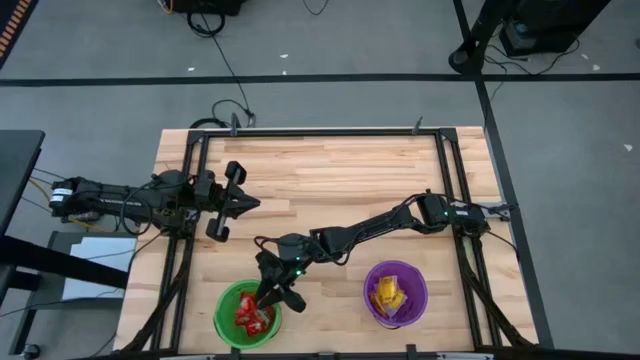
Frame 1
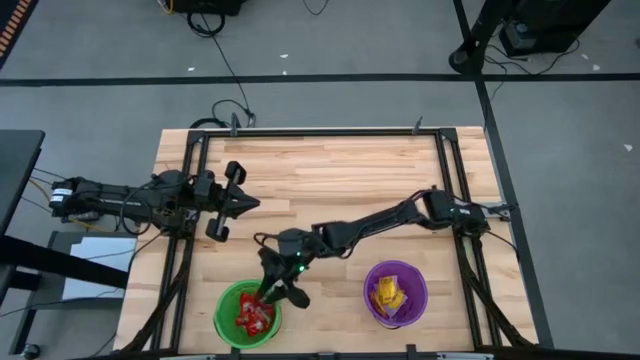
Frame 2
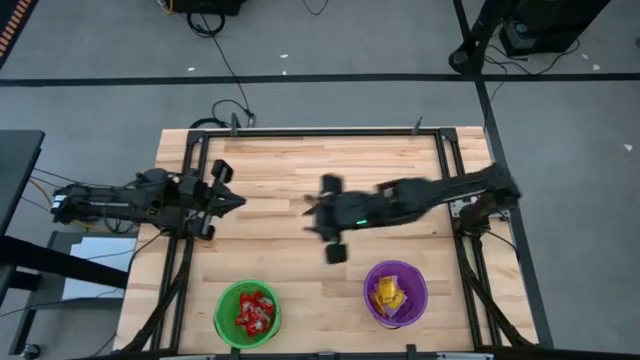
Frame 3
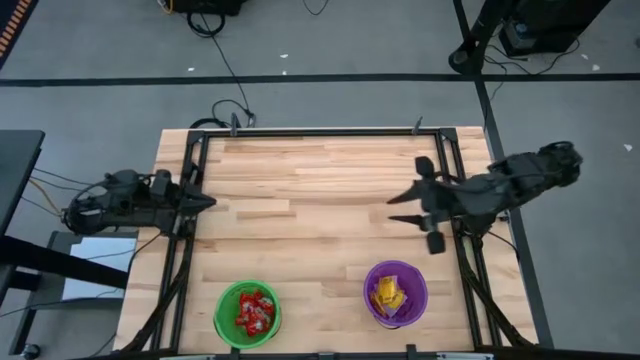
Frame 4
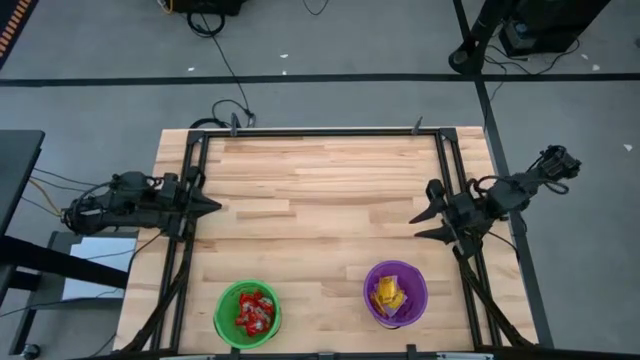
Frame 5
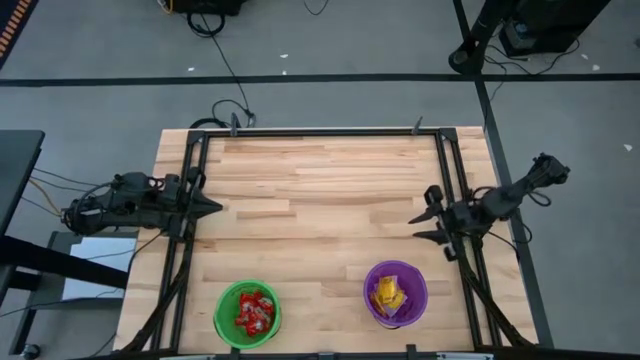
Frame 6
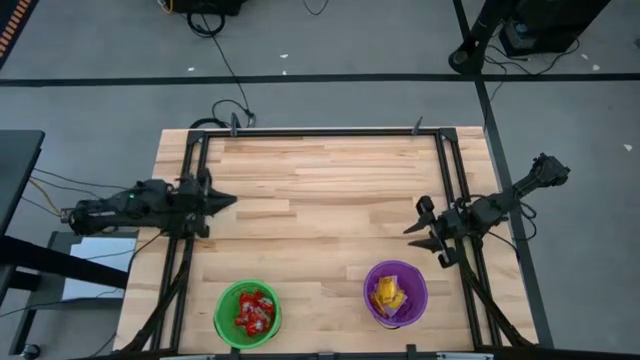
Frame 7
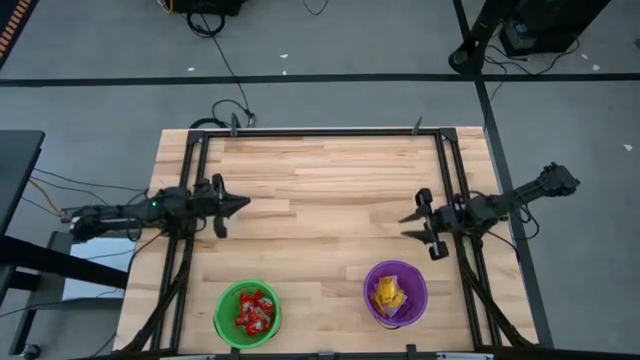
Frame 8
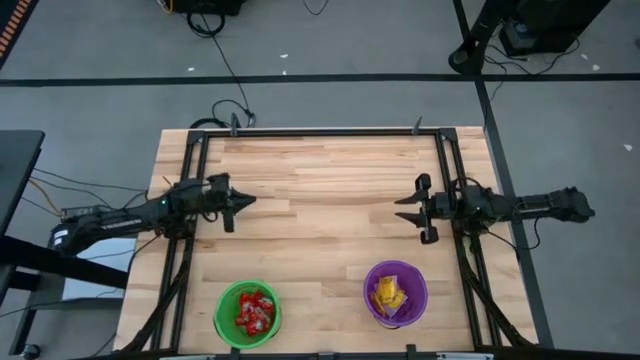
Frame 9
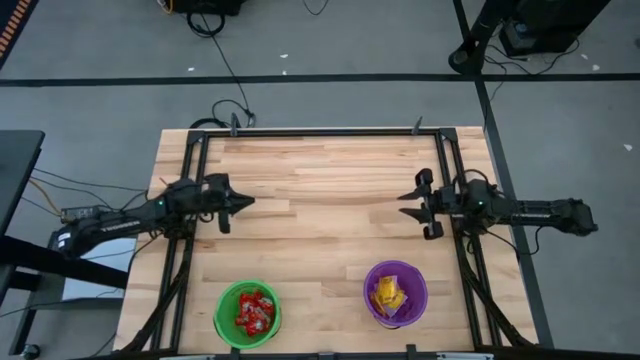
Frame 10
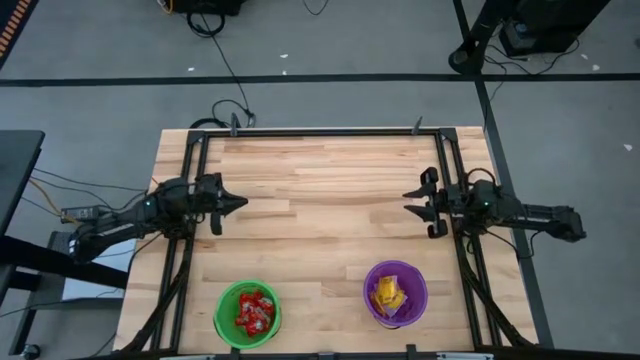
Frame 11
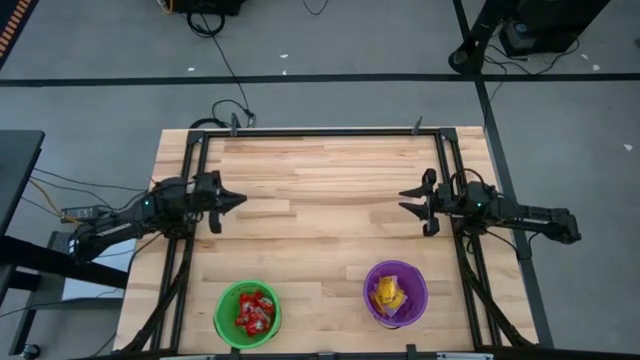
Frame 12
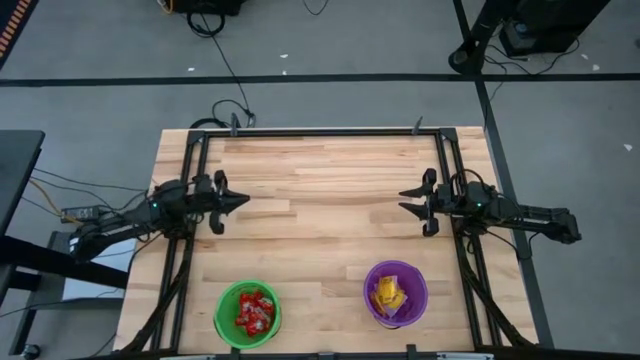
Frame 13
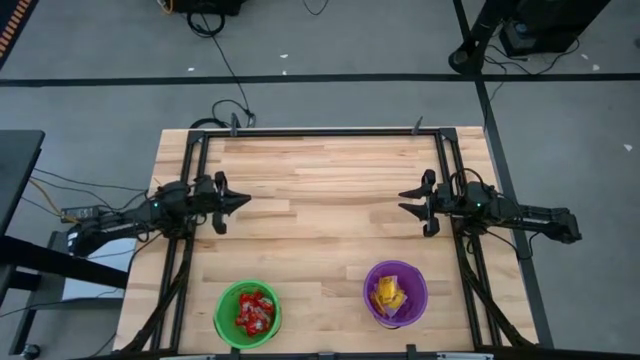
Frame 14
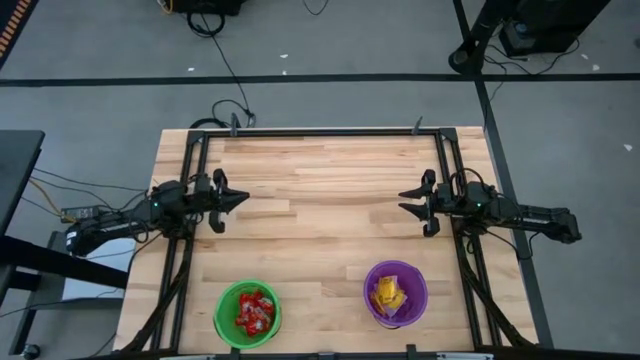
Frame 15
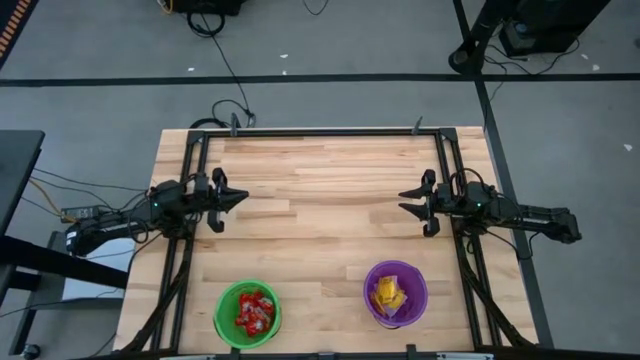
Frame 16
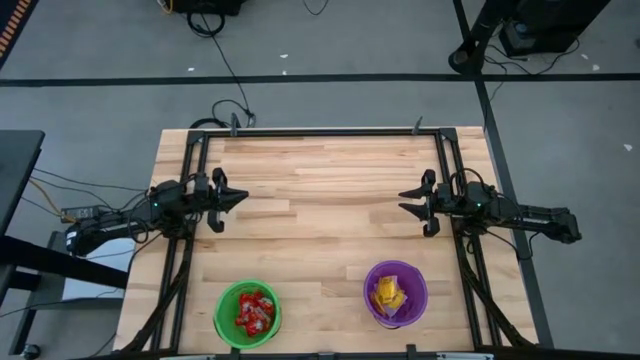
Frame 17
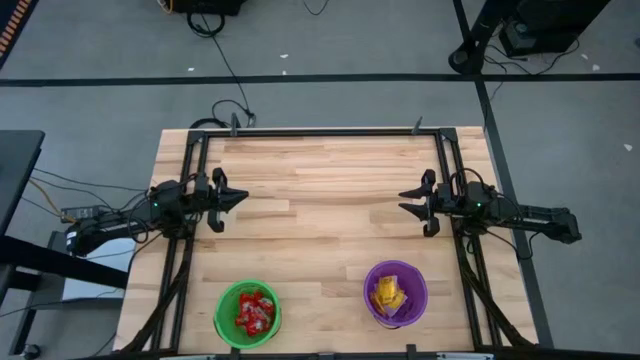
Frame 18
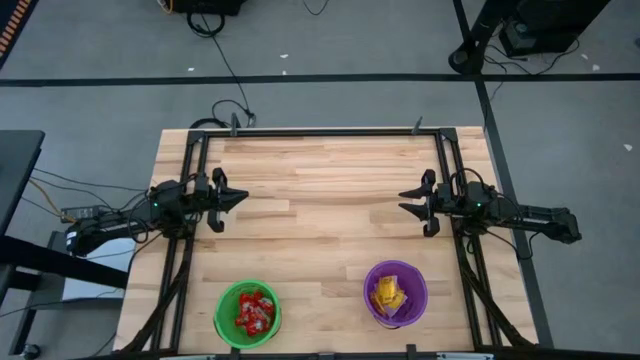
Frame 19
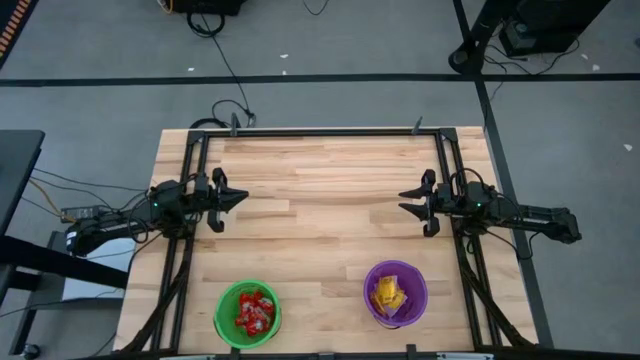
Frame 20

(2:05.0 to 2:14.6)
Task: Sort candy by brand, put in halloween buckets
Return to Home Position

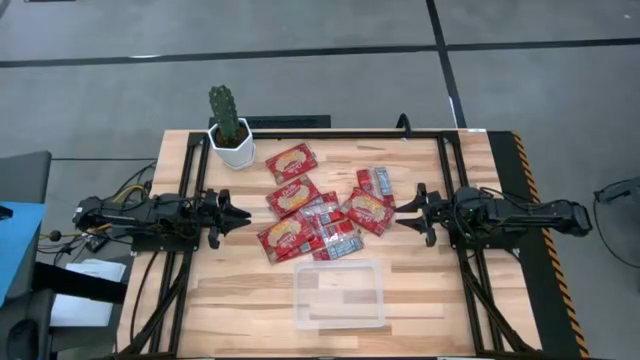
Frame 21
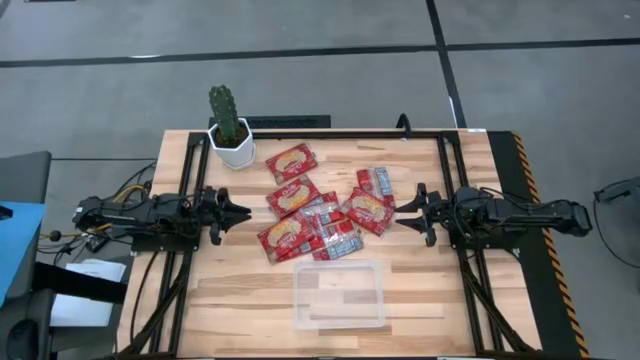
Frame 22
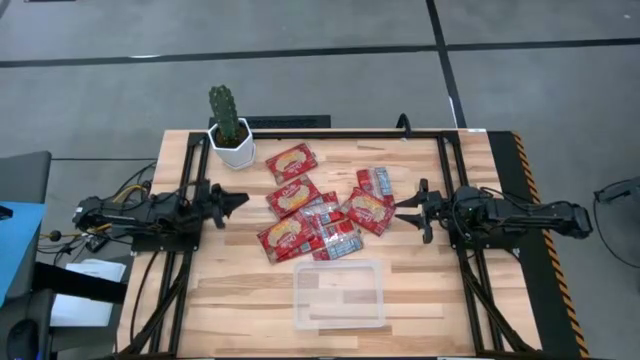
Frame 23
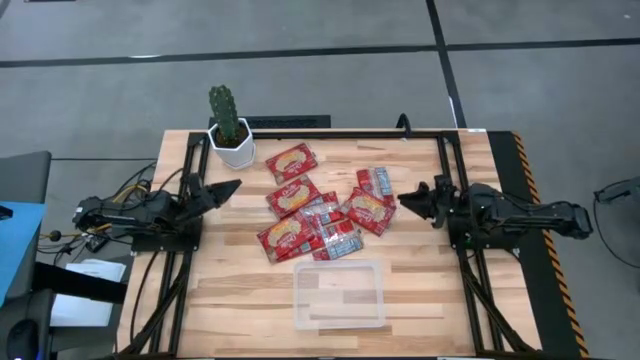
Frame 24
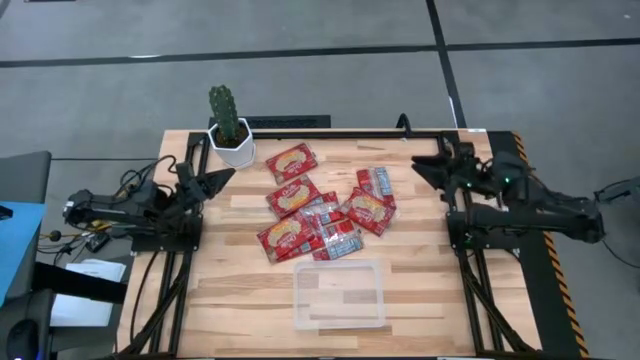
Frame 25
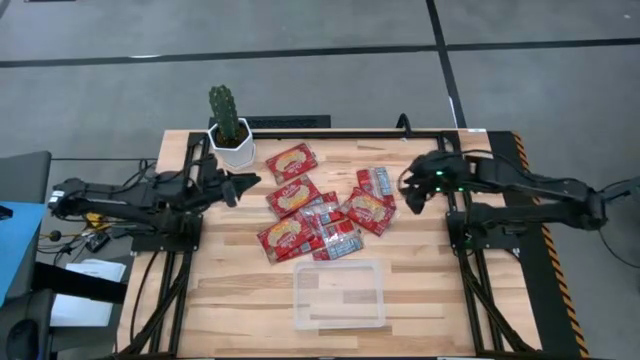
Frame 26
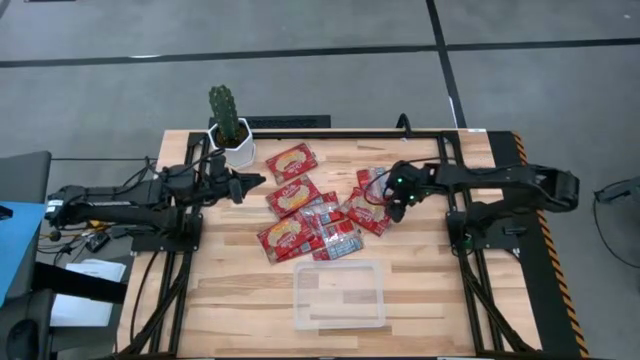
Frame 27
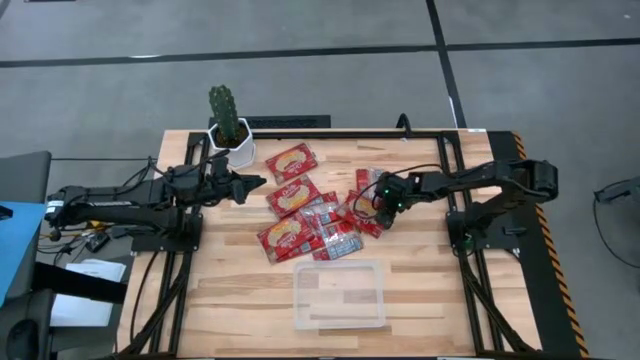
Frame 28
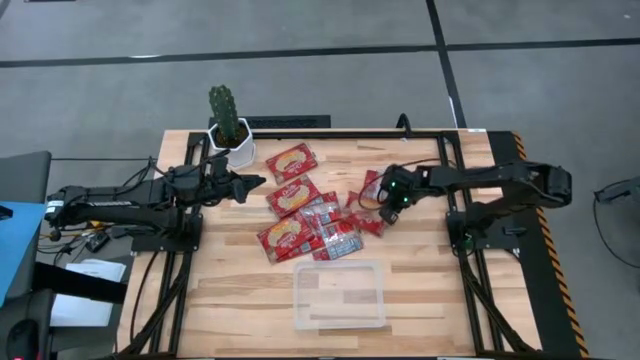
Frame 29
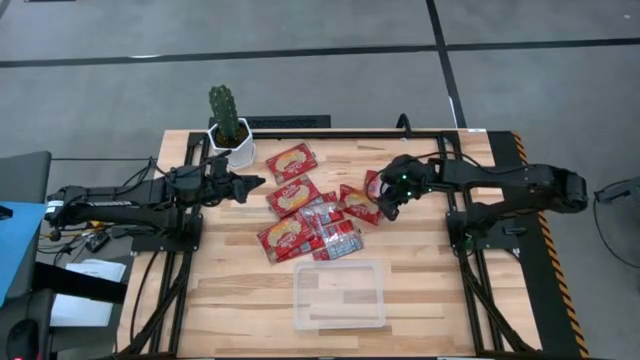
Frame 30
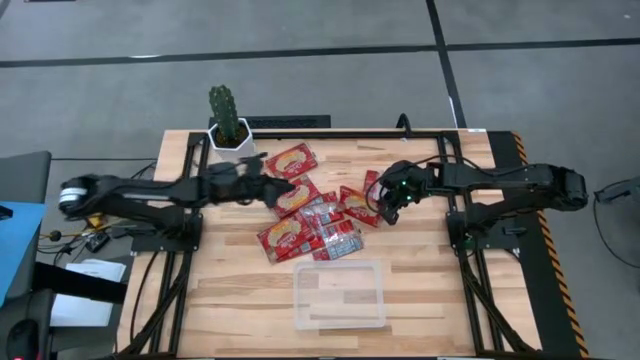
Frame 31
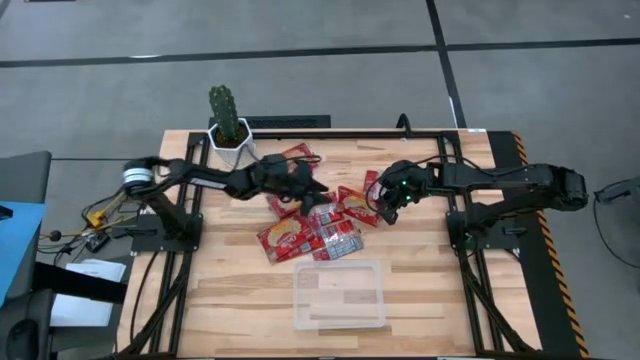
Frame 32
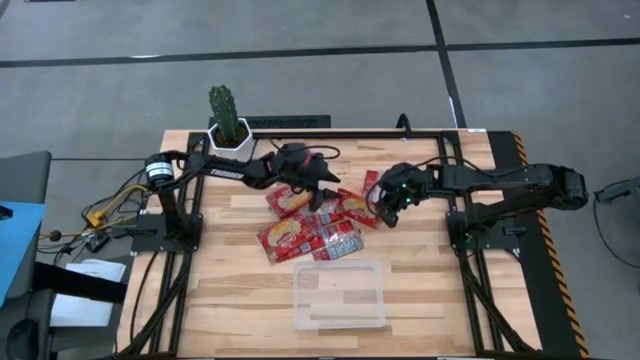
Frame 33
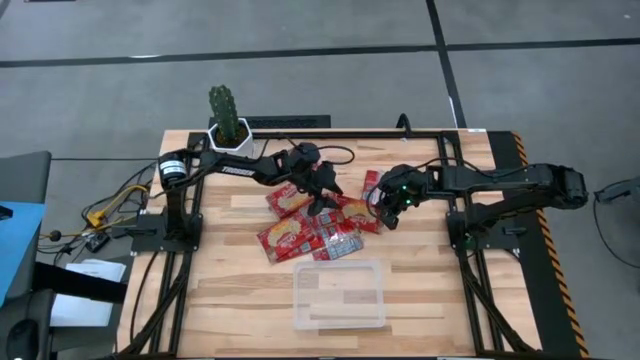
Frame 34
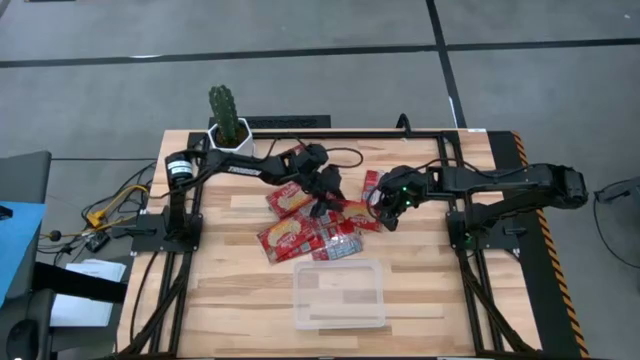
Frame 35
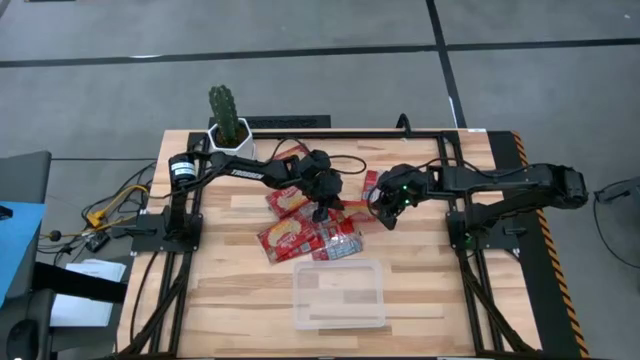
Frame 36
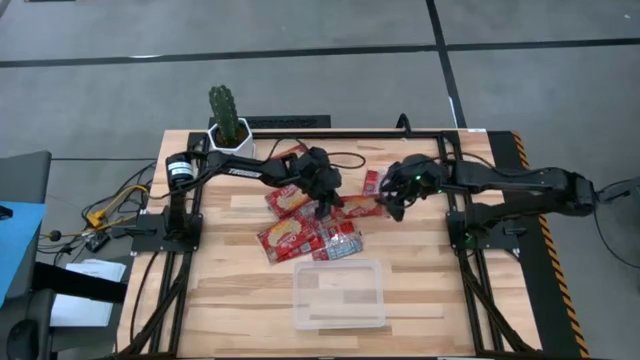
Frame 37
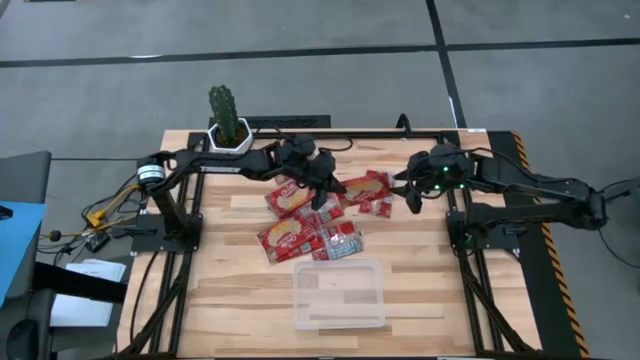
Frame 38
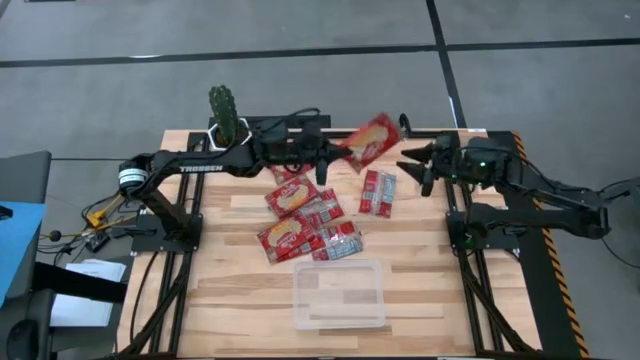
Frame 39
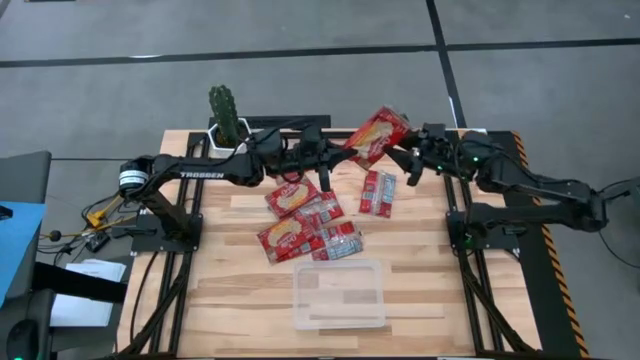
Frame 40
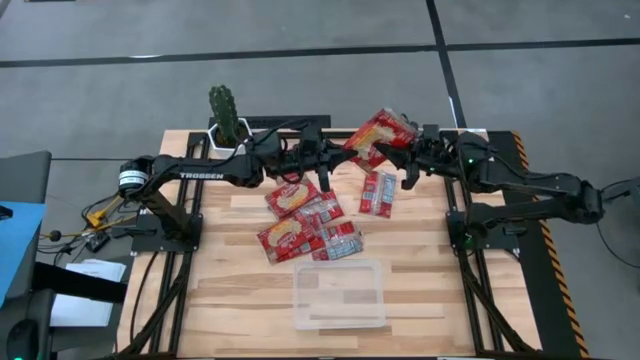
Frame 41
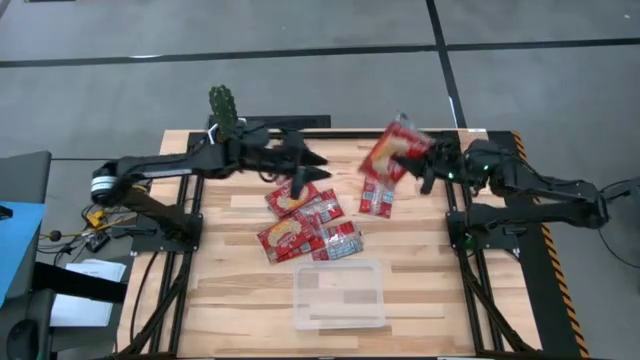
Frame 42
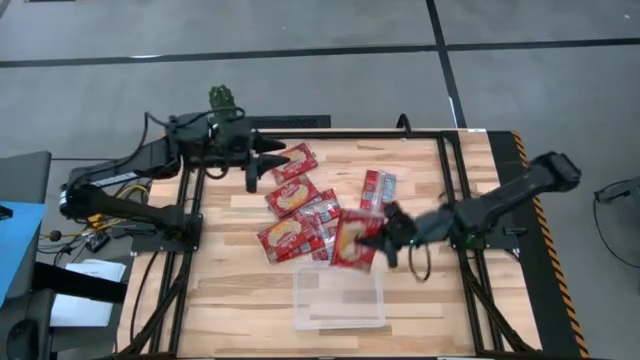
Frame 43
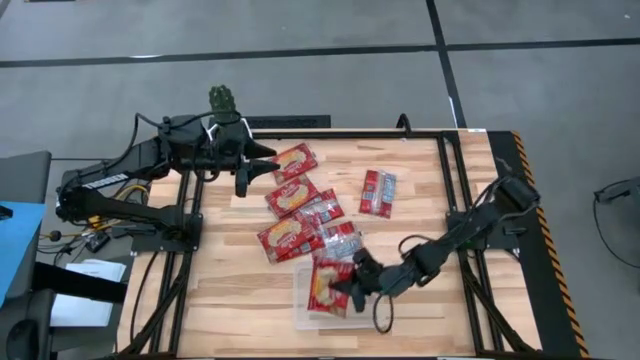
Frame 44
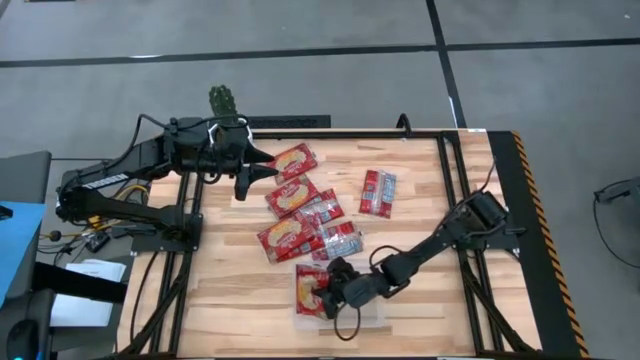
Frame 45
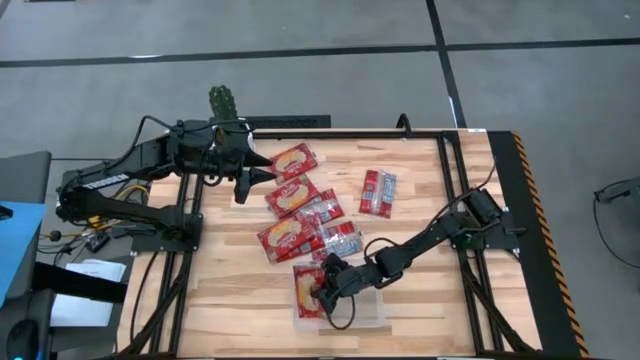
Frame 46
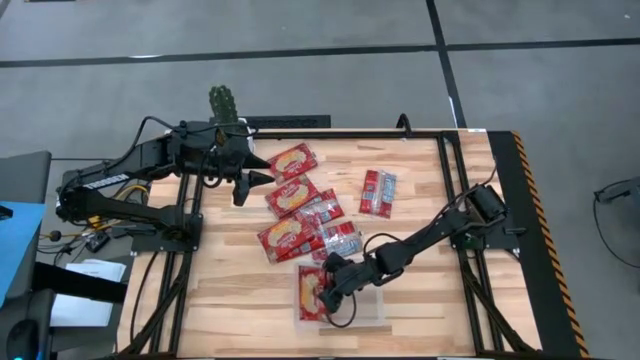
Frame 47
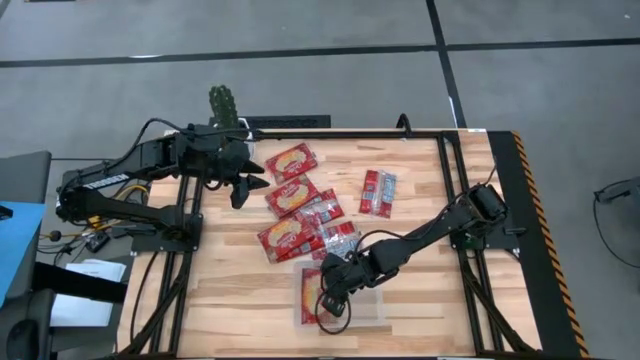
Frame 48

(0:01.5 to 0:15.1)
Task: Sort popcorn bags into baskets
Put the red popcorn bag into the transparent bin
